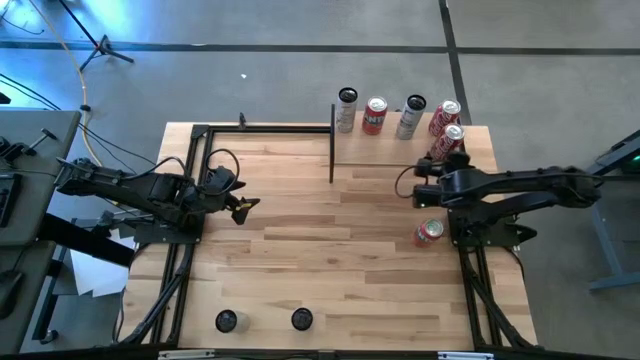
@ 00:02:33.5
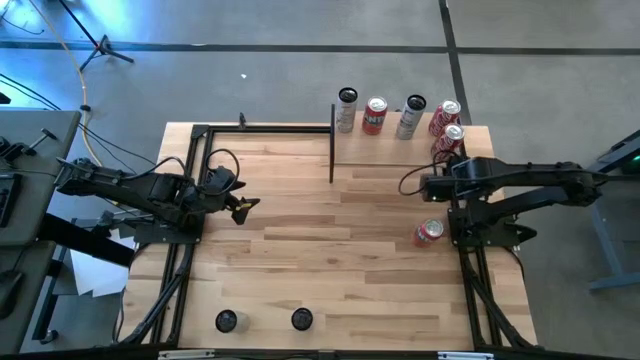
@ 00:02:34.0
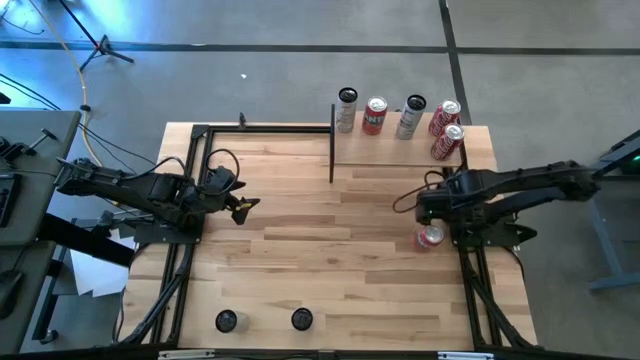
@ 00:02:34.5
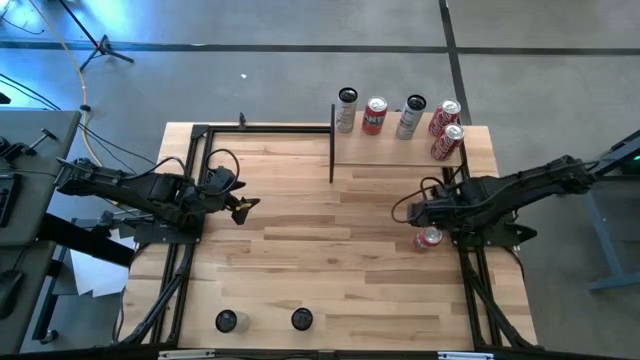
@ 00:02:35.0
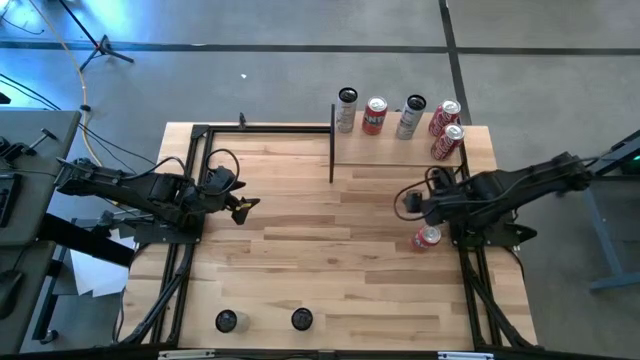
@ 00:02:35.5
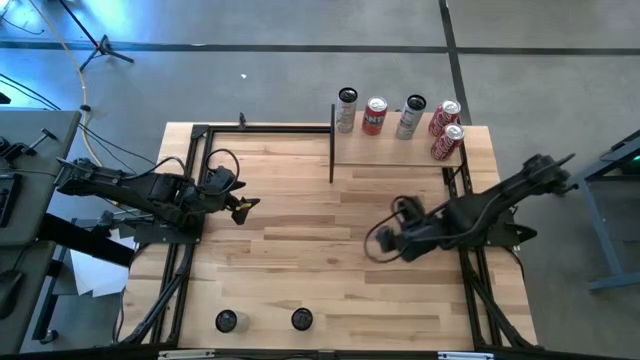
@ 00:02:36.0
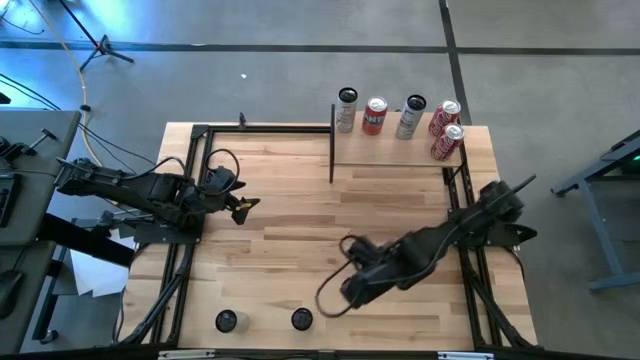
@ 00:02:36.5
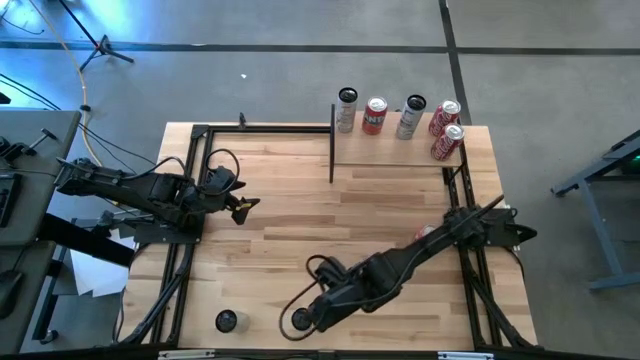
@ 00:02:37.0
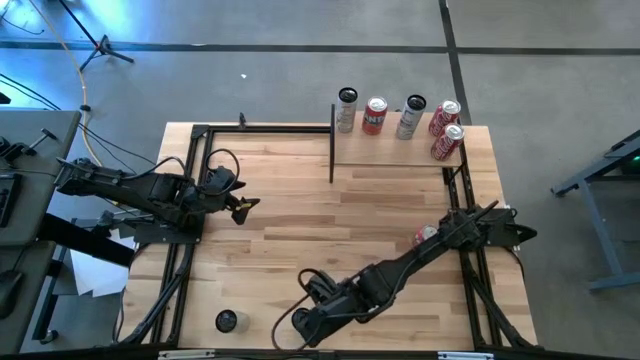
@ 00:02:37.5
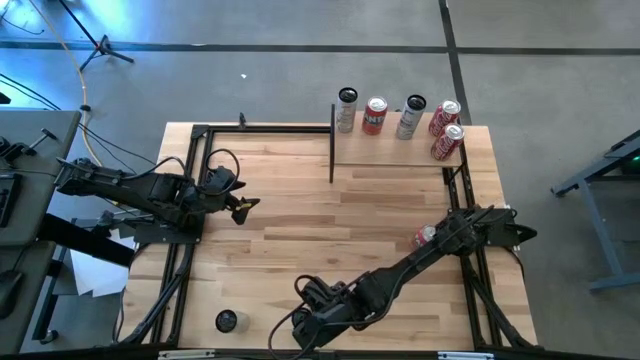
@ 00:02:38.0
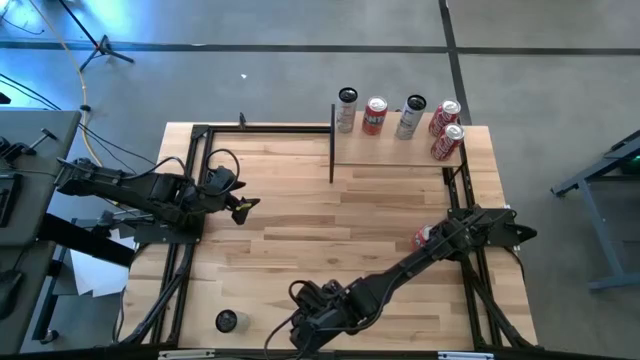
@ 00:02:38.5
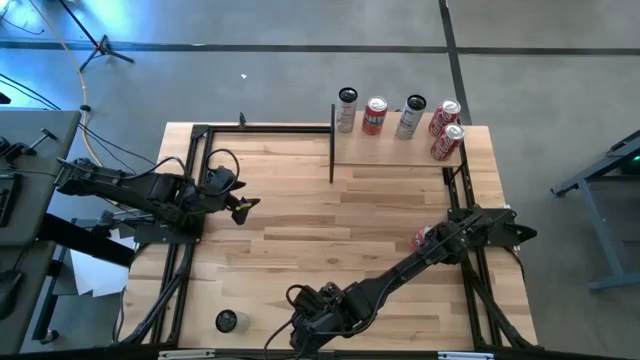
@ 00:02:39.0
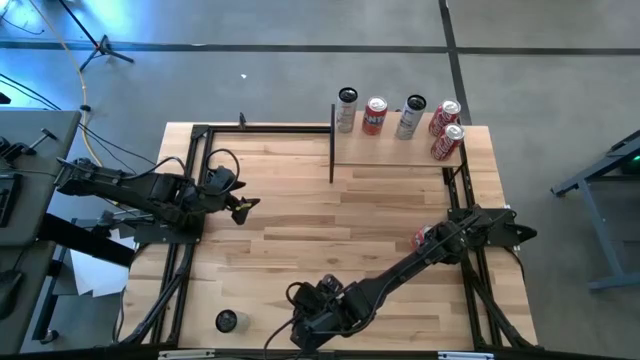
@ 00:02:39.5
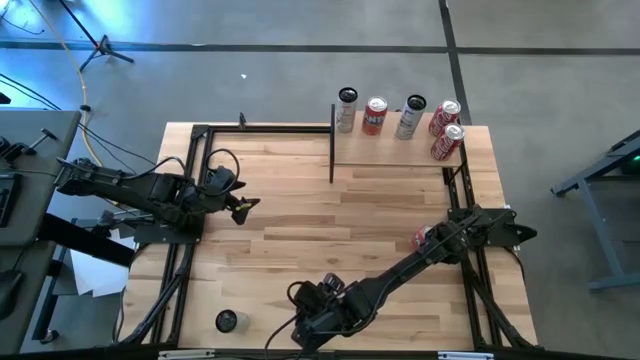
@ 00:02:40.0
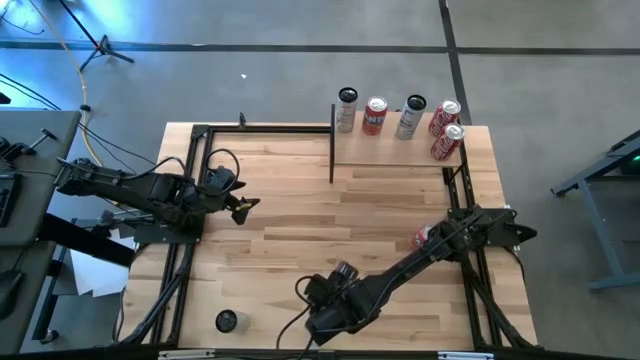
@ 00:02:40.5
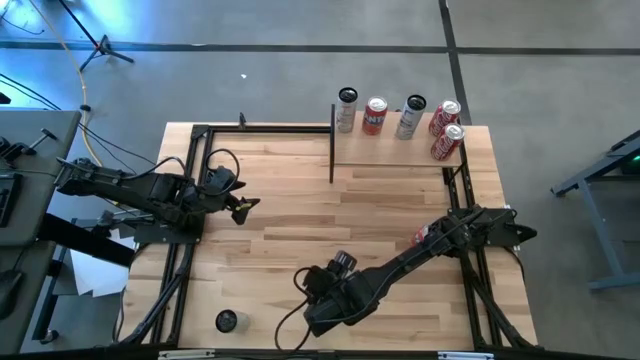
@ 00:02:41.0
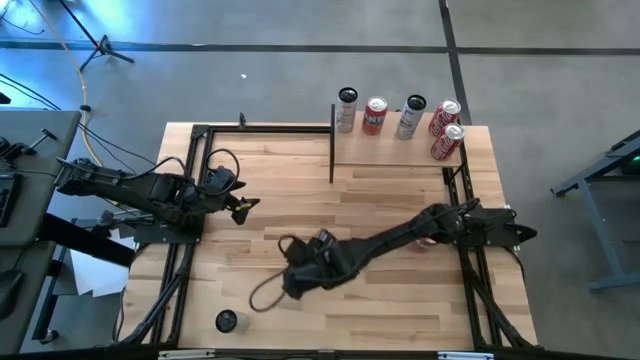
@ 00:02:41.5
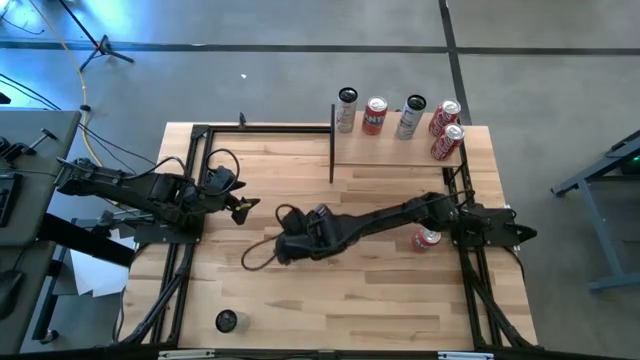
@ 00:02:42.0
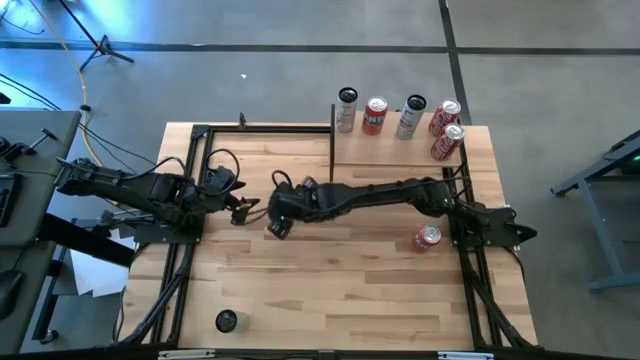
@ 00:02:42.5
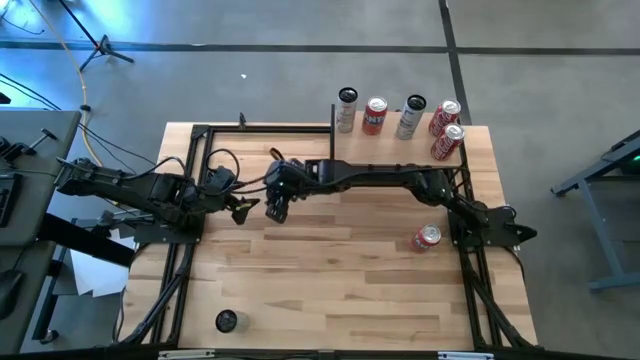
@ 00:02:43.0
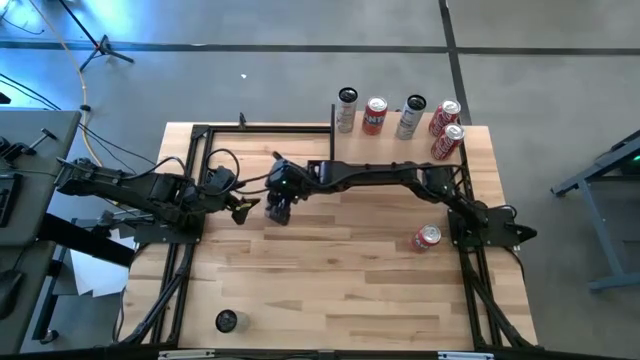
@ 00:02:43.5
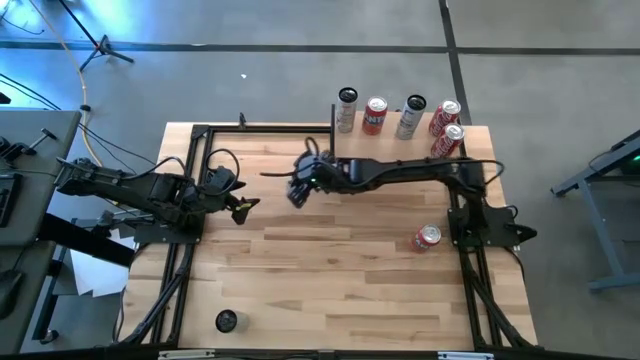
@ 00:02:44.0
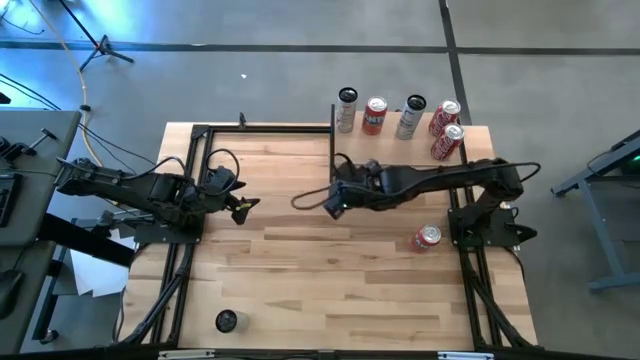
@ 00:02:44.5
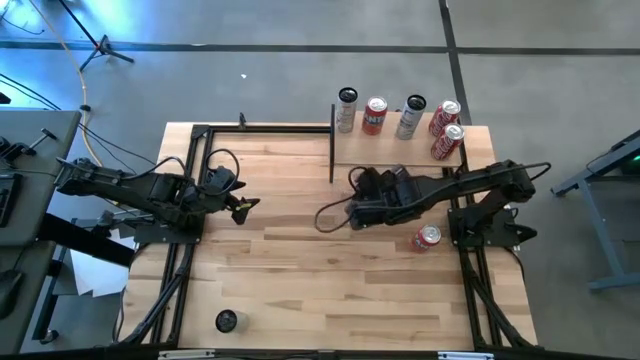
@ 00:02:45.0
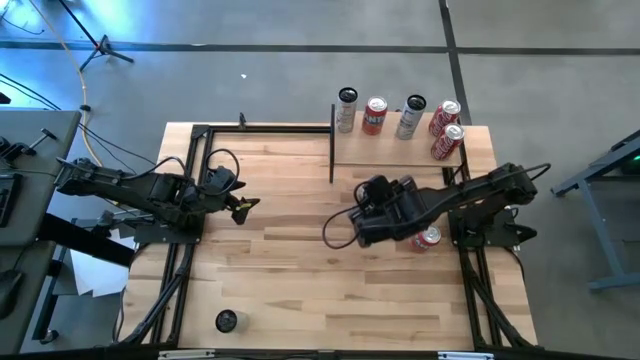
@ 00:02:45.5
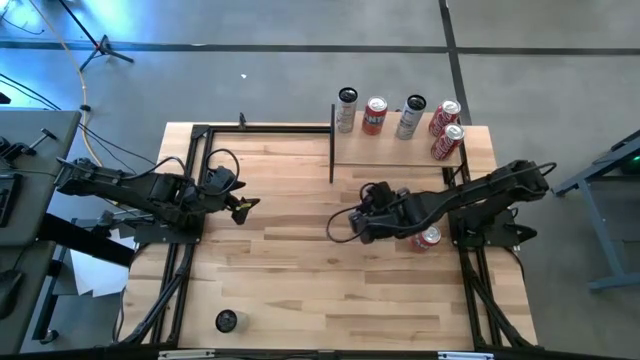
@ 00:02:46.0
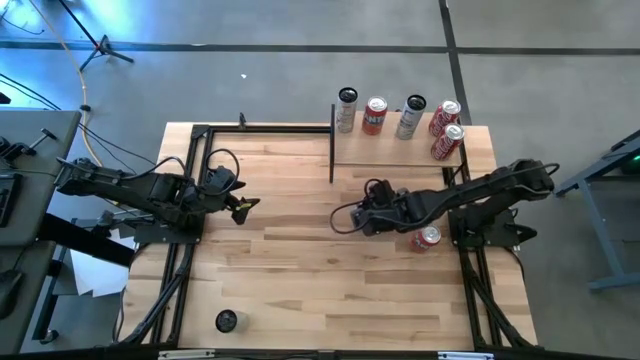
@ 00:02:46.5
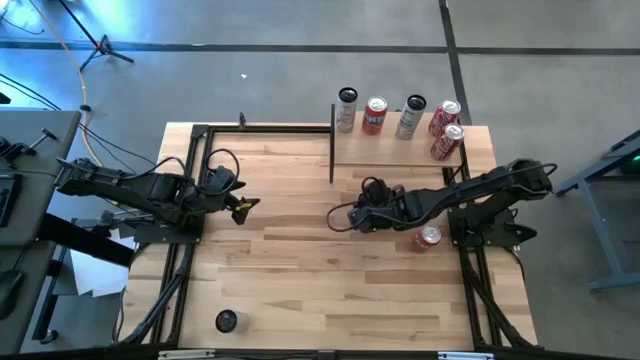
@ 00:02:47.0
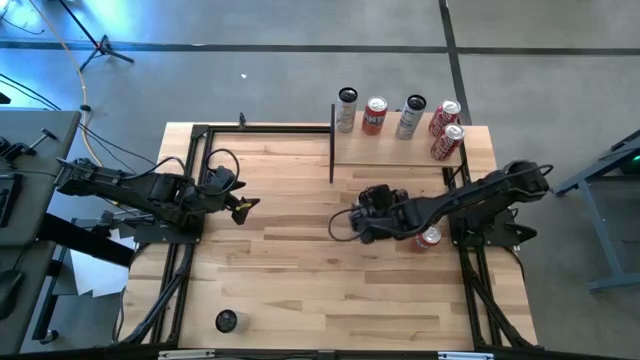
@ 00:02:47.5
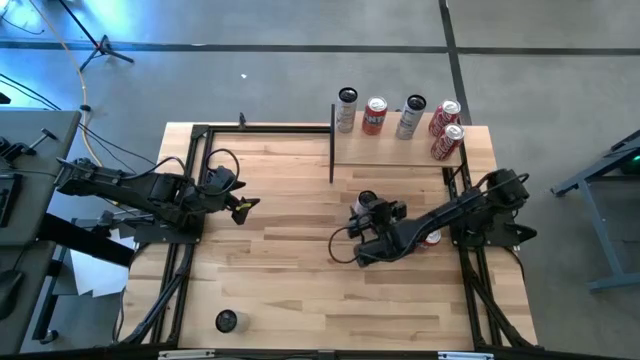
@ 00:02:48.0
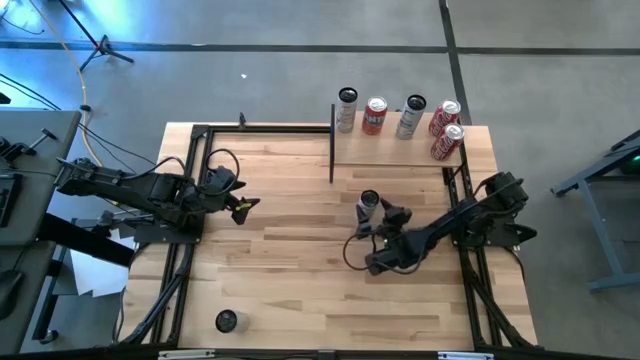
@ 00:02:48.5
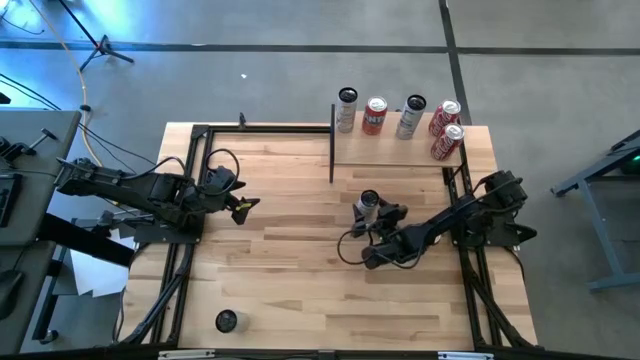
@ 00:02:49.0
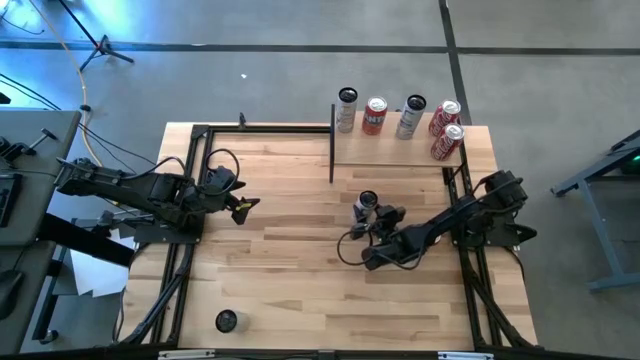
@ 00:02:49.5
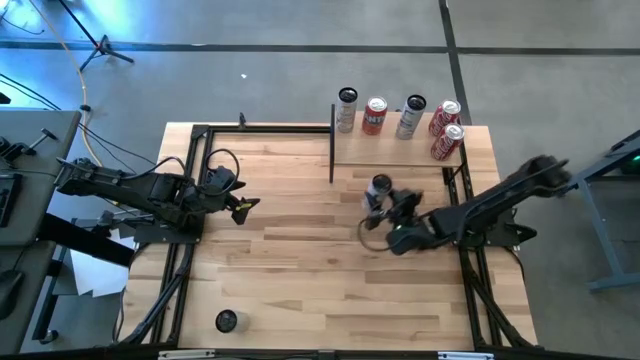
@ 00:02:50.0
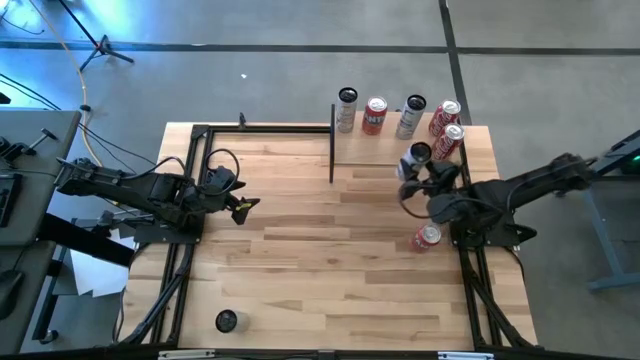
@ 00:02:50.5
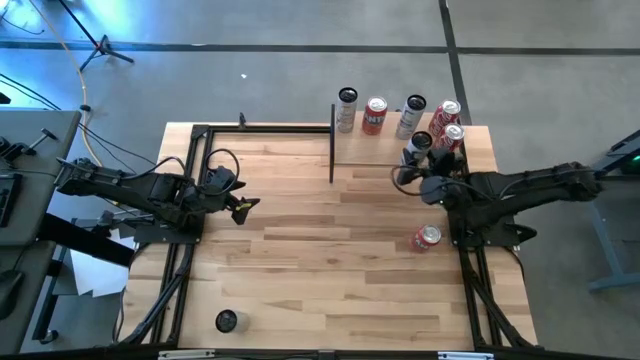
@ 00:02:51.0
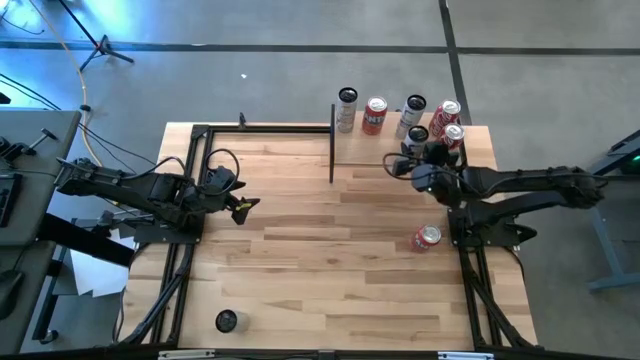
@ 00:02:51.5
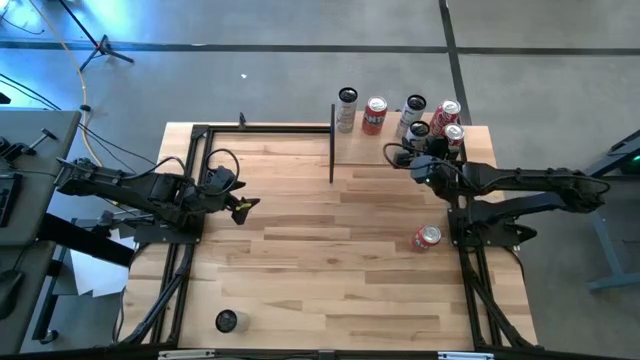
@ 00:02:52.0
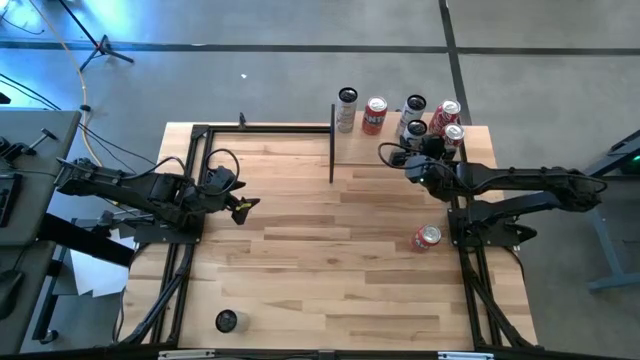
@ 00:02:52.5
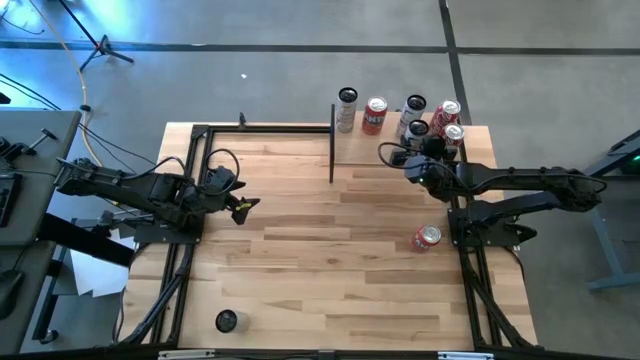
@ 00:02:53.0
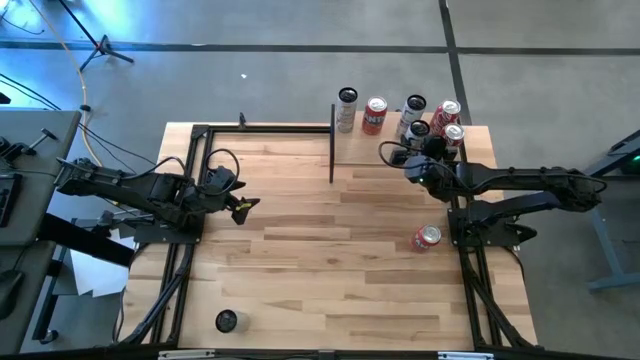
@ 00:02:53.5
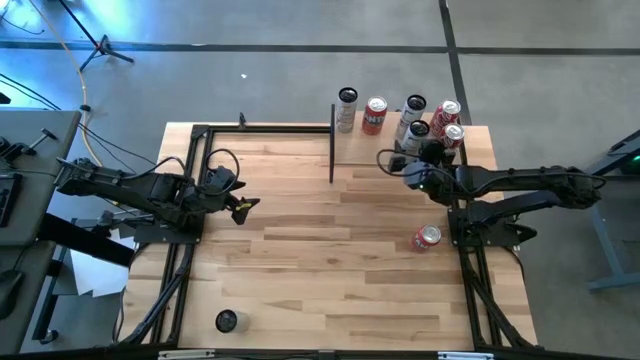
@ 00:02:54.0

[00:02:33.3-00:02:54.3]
Task: Place canned beverage on shelf
Put the white blue soda can on the shelf aligned with the other white blue soda can

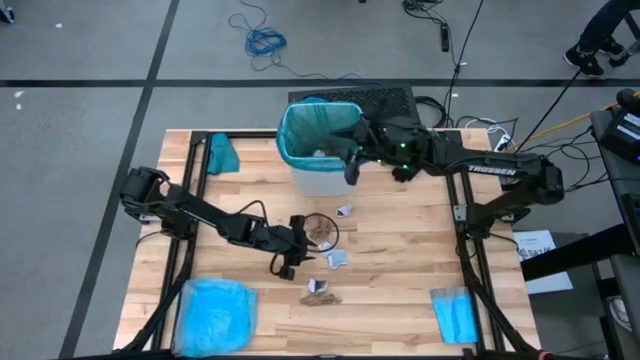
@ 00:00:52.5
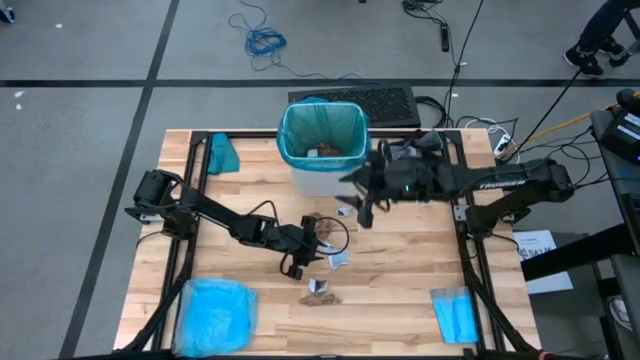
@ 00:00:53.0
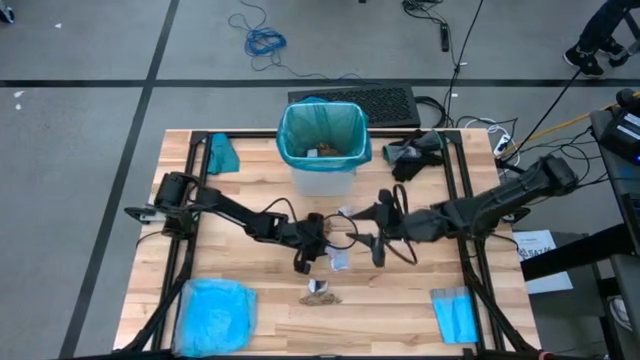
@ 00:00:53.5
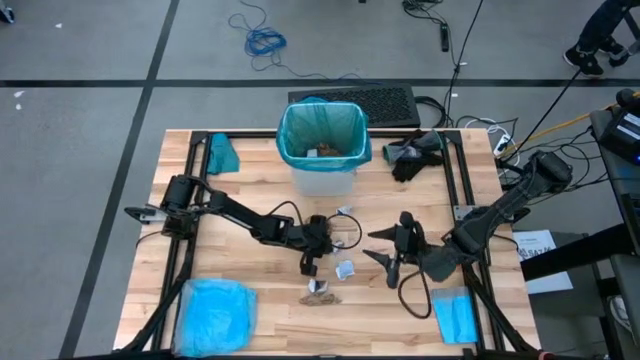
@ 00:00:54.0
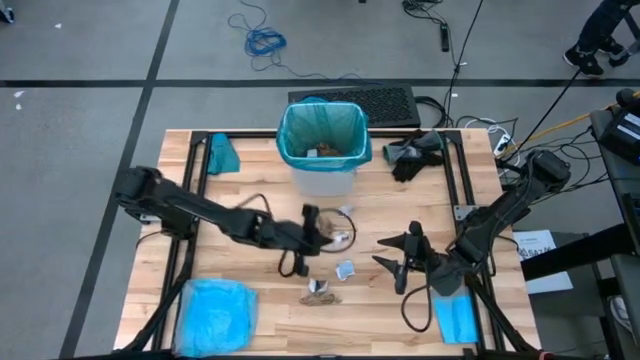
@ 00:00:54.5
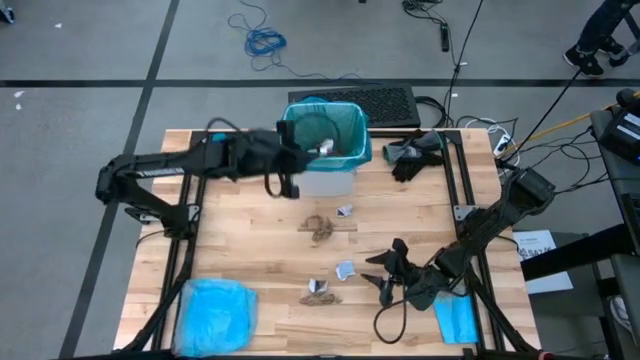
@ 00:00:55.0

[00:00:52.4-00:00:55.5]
Task: place trash/remove bag and relplace
Put the white paper into the trash bin
